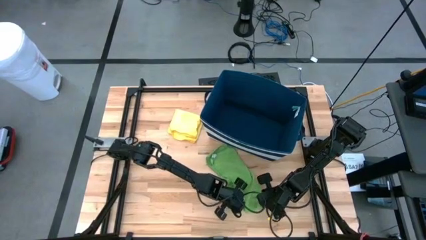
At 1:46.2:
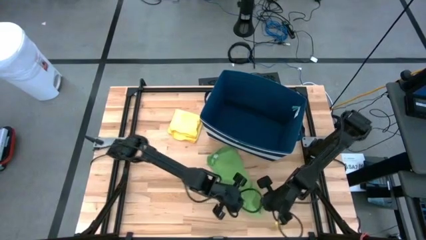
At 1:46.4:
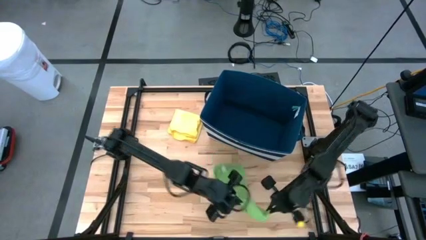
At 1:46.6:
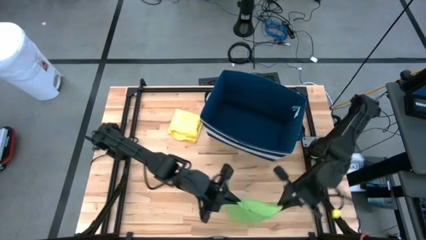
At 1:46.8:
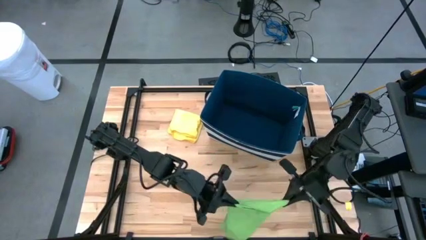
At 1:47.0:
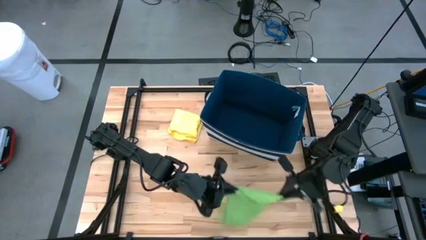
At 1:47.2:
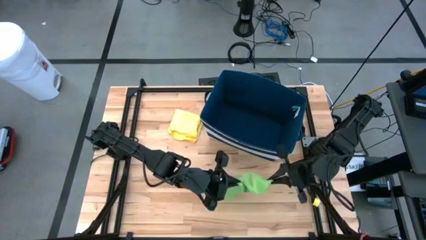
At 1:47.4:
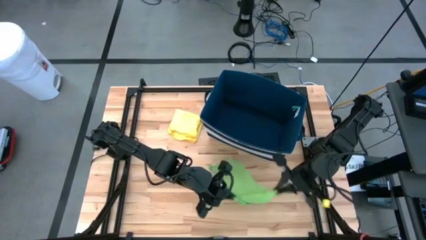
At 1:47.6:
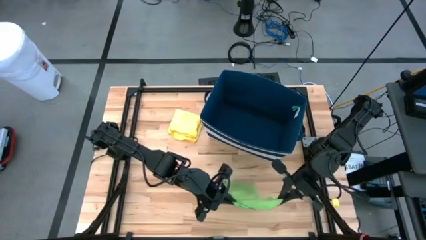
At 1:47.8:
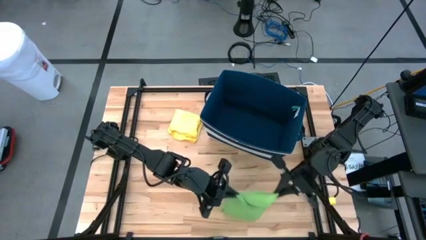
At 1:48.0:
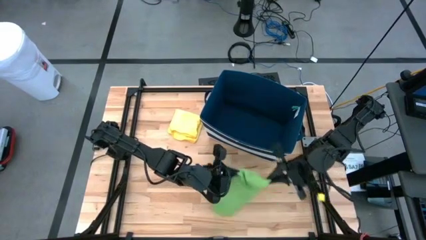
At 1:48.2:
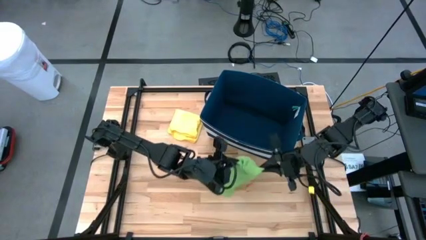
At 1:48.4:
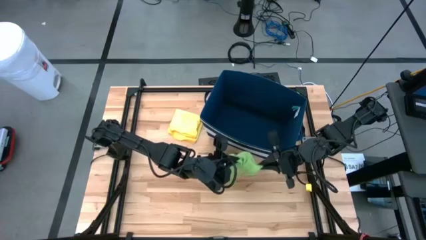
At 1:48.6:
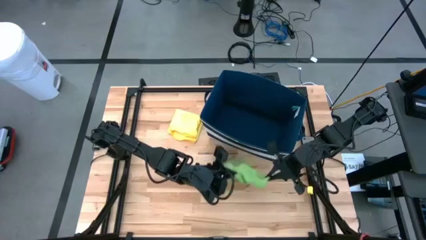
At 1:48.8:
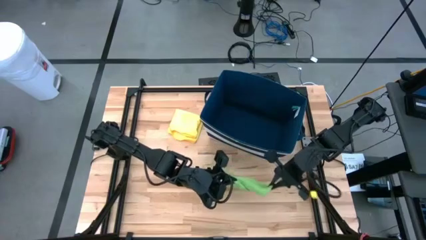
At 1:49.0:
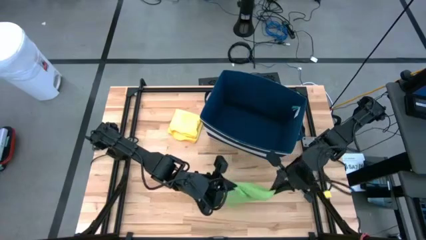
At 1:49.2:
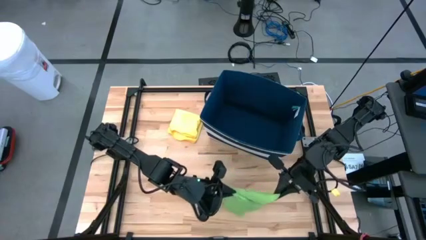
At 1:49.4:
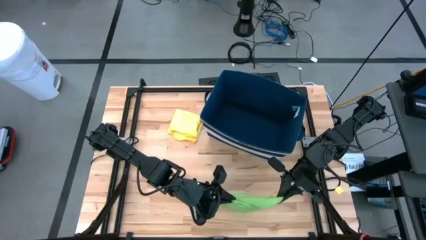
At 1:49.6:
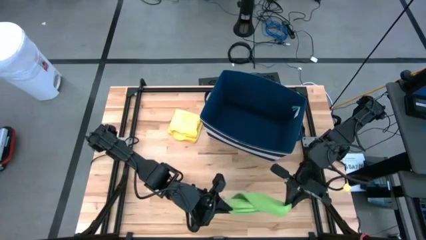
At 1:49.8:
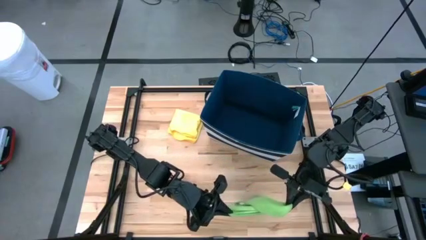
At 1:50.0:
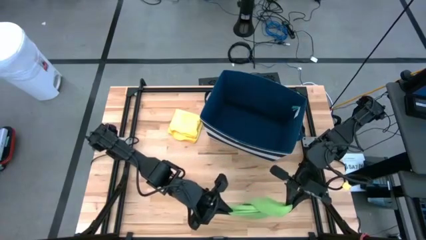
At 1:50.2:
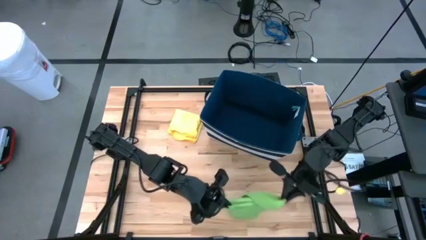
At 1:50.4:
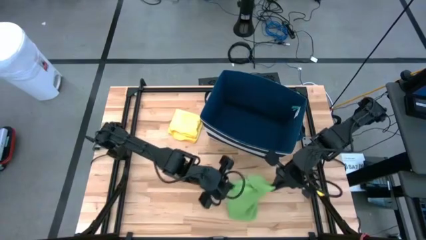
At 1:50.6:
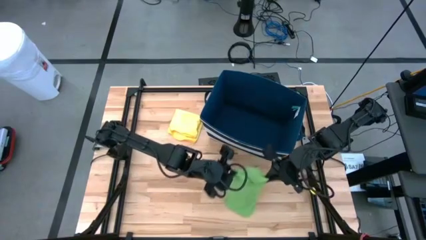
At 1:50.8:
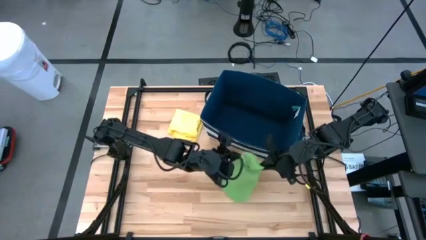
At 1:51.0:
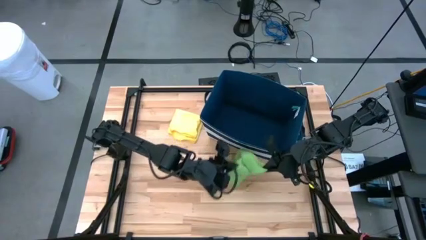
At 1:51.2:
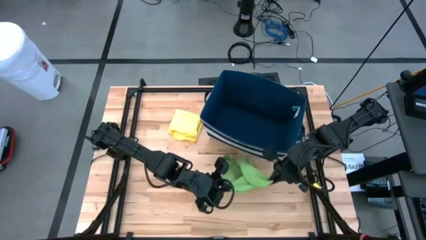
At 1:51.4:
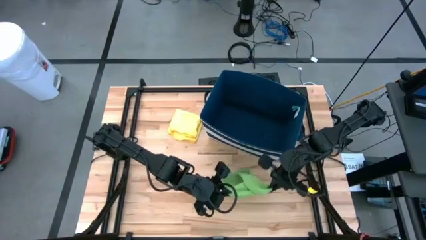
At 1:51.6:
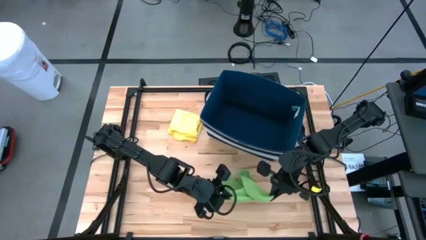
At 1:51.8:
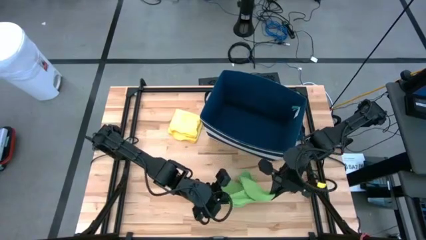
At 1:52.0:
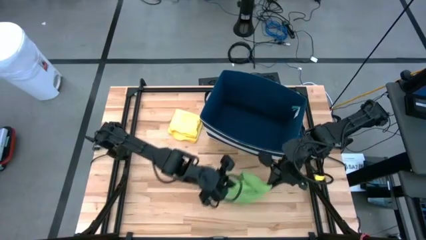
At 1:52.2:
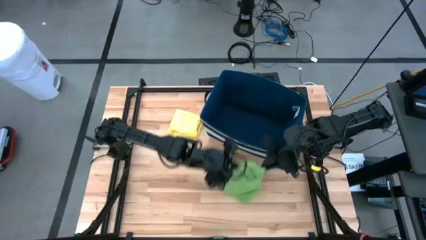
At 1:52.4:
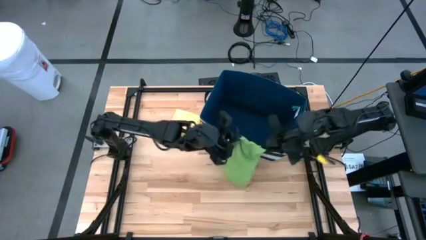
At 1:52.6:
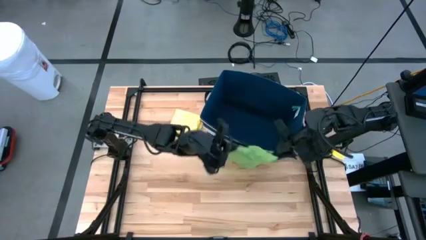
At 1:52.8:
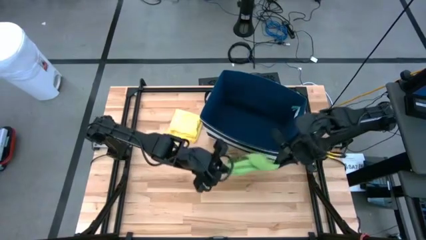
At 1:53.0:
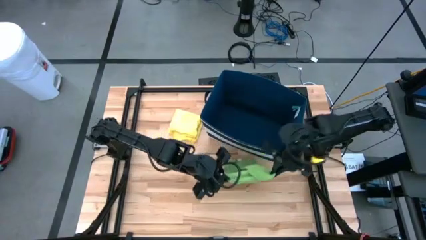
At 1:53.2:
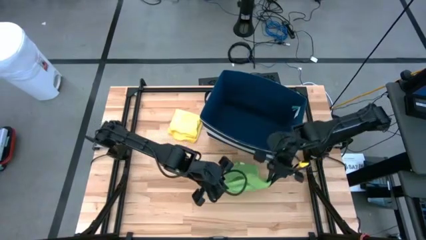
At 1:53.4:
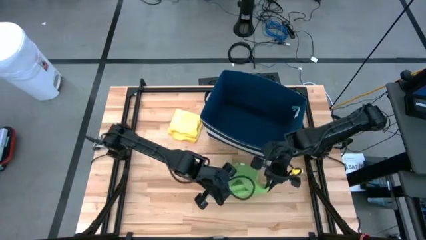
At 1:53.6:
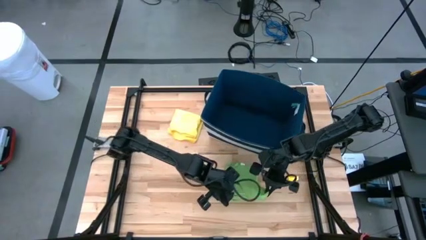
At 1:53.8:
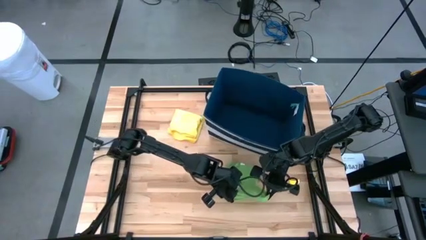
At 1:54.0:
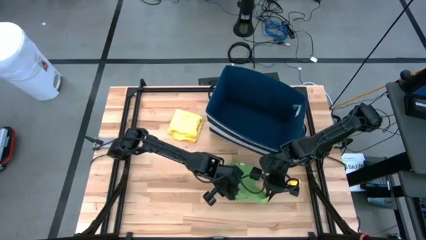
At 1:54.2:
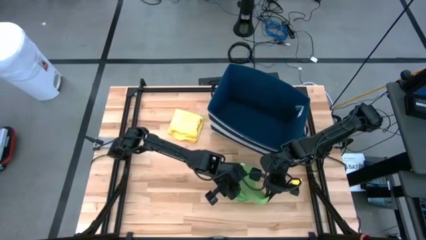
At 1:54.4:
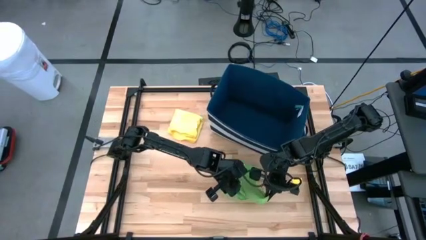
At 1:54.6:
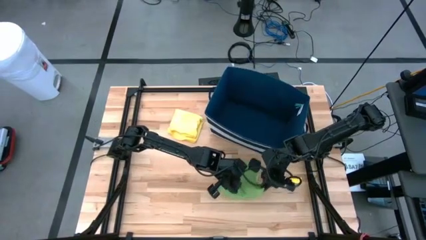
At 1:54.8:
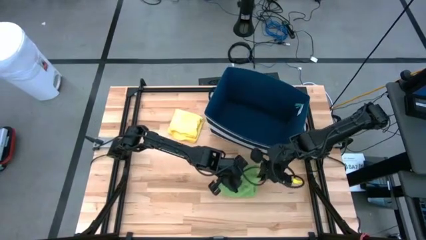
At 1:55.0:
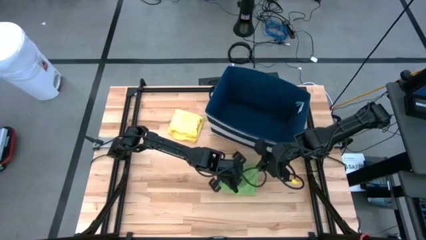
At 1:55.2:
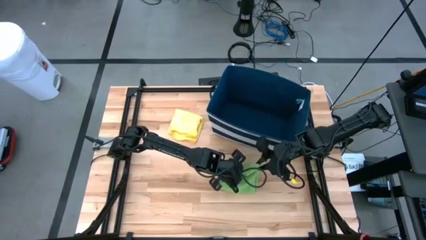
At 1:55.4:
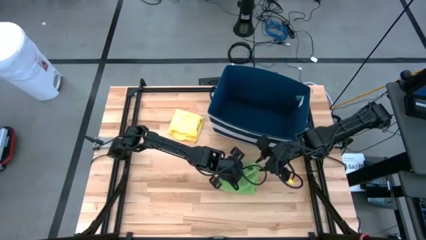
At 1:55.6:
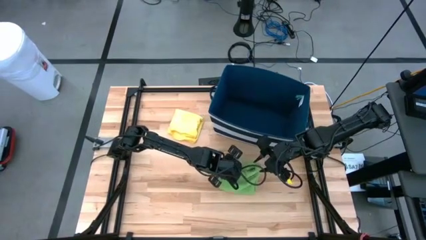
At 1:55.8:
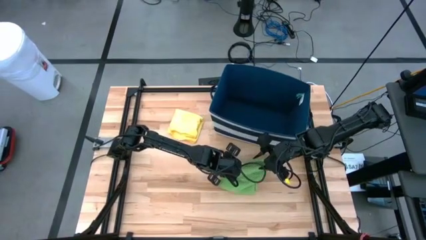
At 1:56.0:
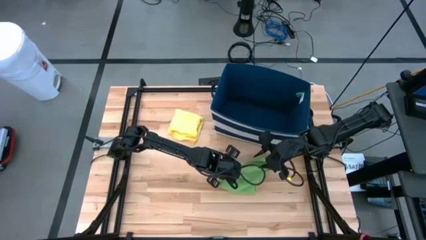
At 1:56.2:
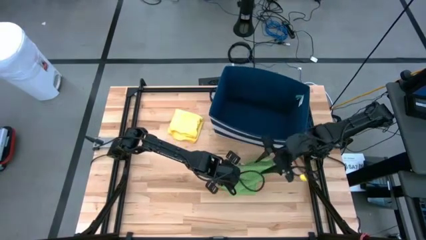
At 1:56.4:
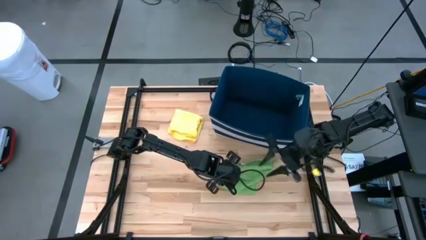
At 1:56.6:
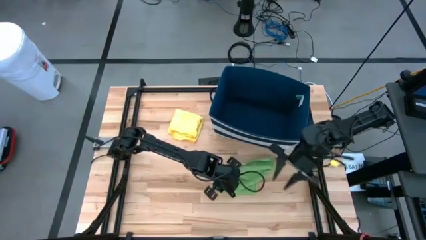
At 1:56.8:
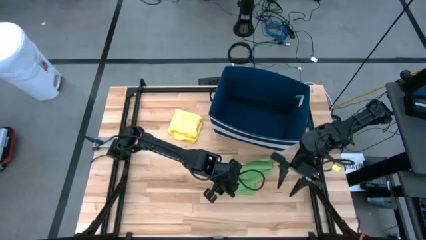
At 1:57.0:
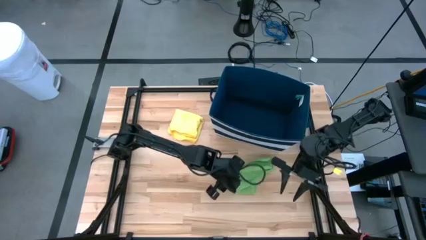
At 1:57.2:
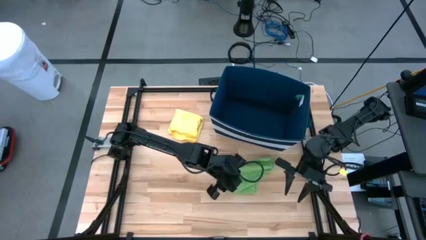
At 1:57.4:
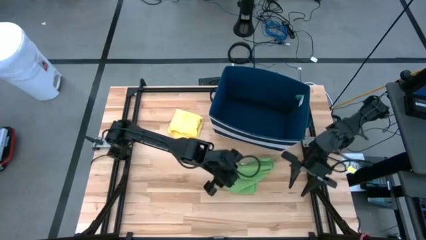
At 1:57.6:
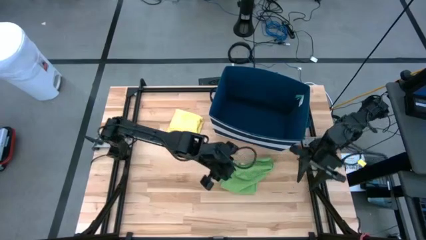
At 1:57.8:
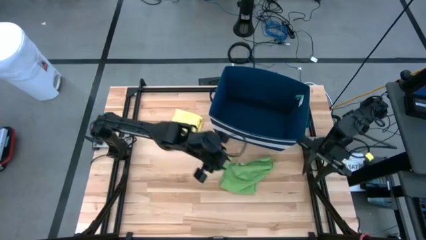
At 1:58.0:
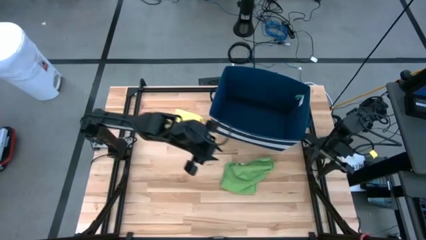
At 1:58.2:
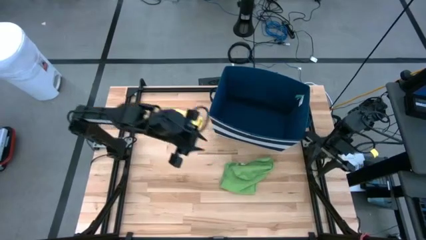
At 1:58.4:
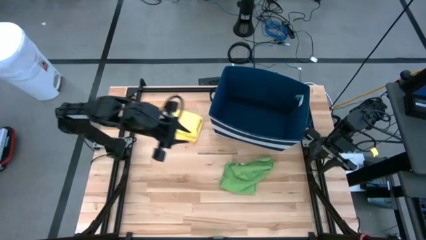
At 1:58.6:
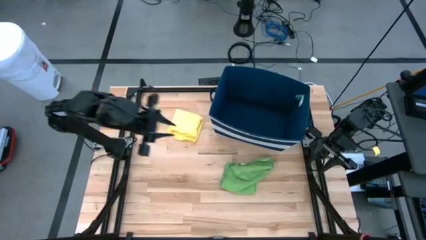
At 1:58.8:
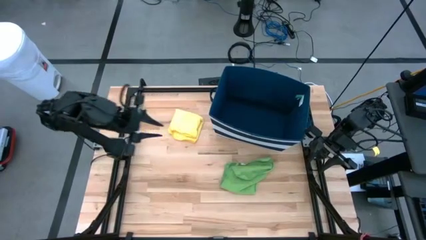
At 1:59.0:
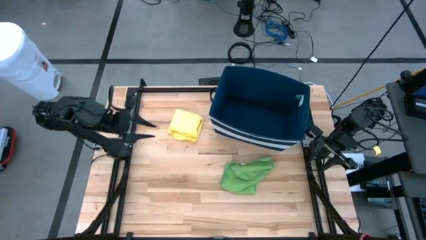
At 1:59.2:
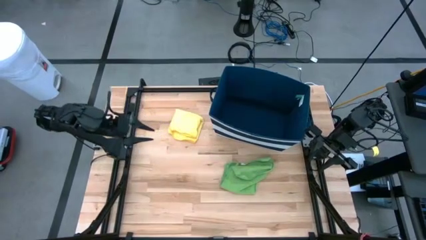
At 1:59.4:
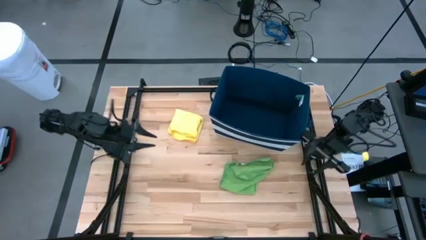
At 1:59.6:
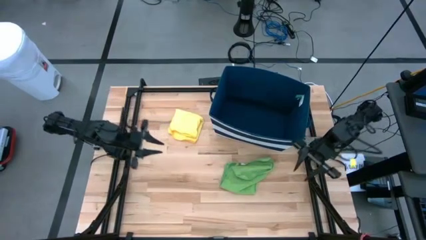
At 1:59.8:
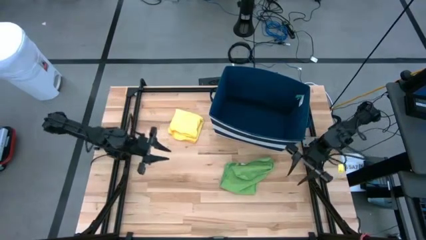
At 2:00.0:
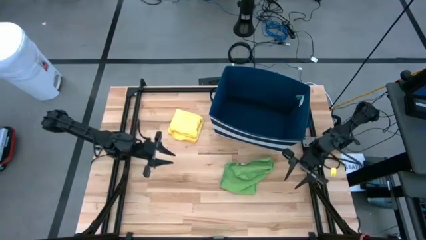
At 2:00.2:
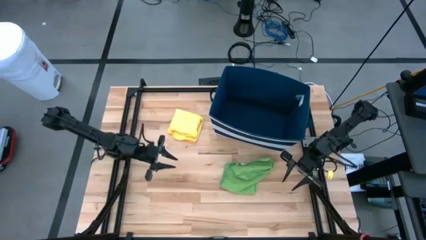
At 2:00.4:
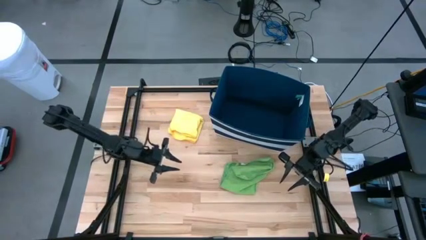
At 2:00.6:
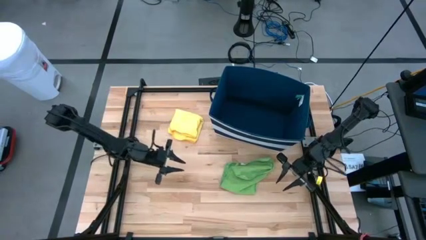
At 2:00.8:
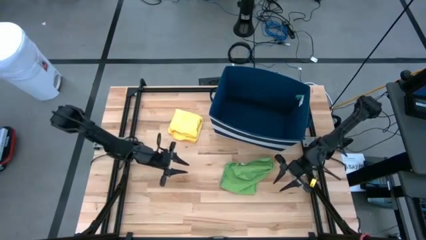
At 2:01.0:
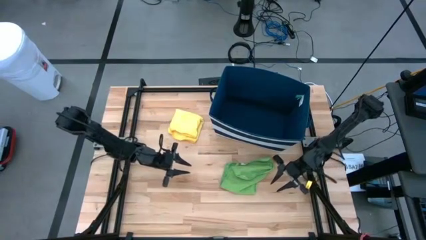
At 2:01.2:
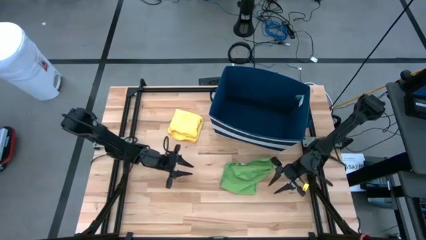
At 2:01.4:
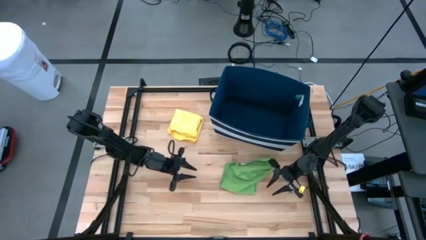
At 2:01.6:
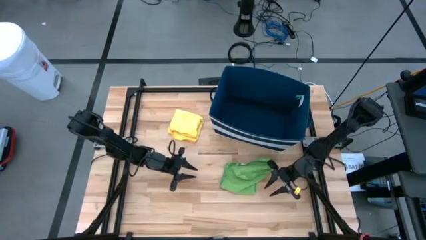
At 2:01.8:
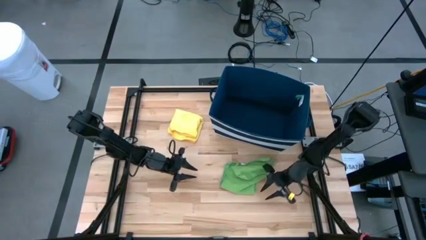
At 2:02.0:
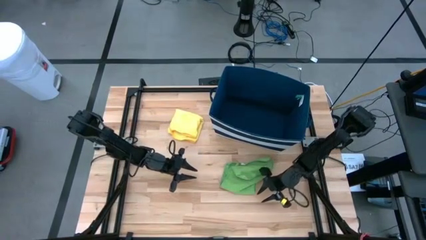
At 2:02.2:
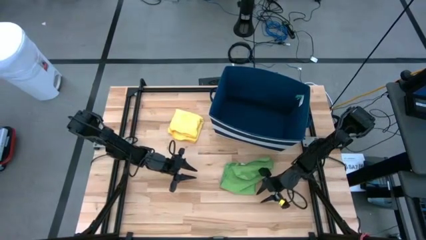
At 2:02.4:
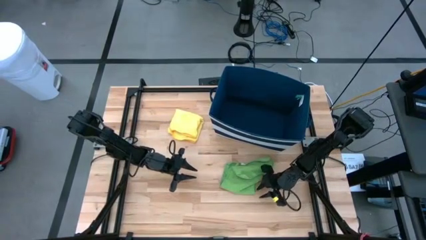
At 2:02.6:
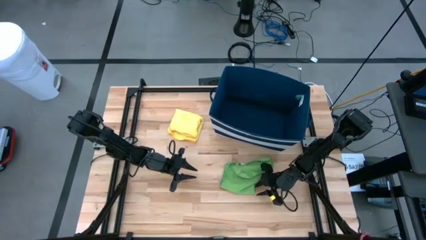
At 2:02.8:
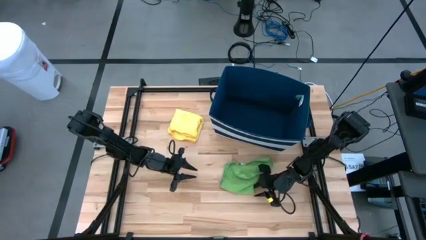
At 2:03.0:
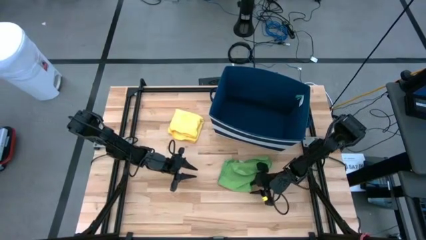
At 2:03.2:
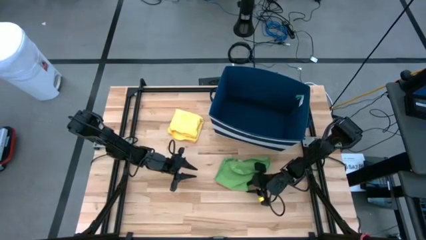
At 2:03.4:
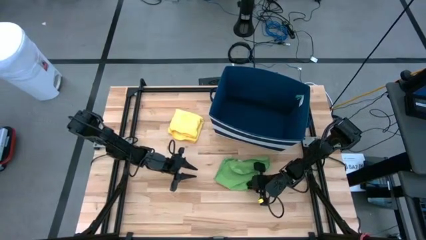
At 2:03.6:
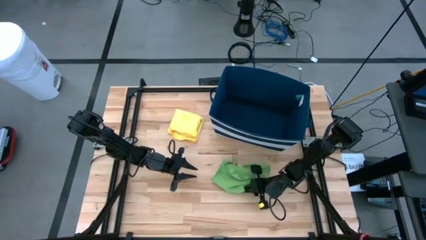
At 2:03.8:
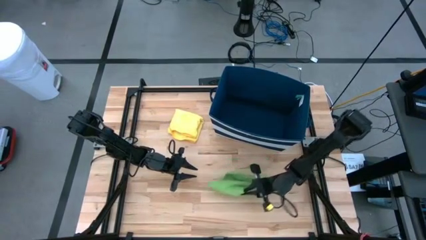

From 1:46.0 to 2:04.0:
Task: Fold towel
Fold the green towel
